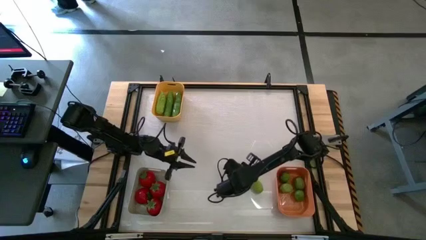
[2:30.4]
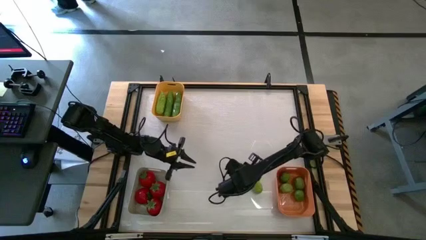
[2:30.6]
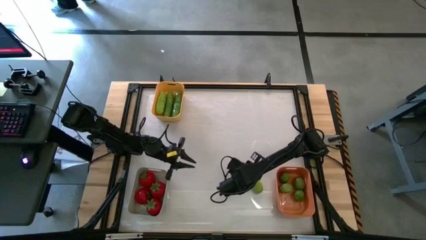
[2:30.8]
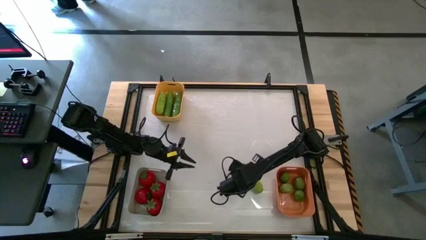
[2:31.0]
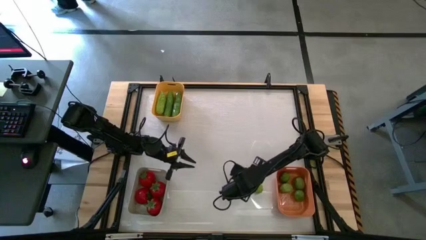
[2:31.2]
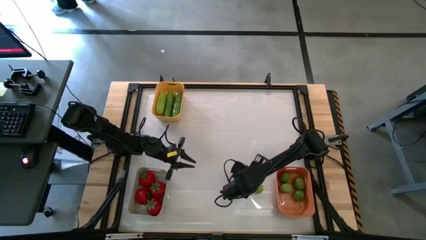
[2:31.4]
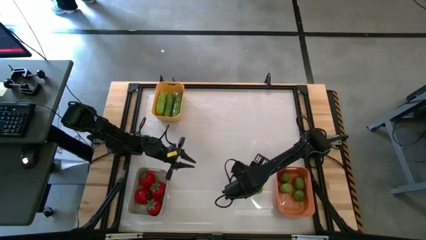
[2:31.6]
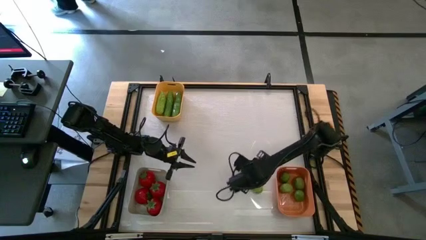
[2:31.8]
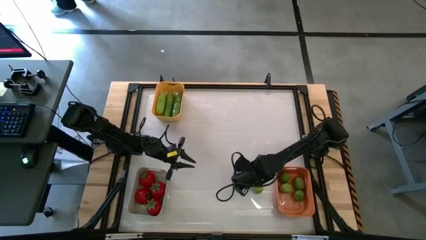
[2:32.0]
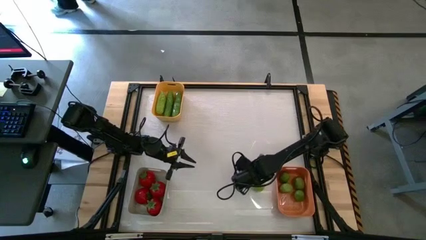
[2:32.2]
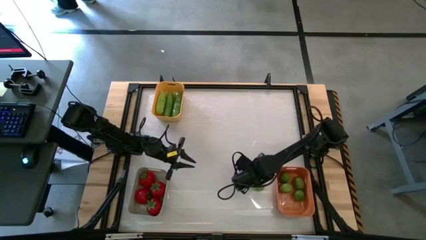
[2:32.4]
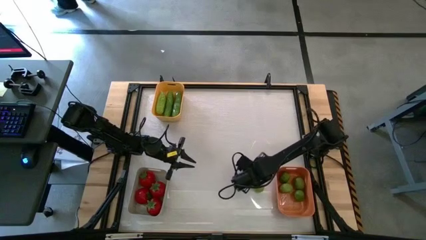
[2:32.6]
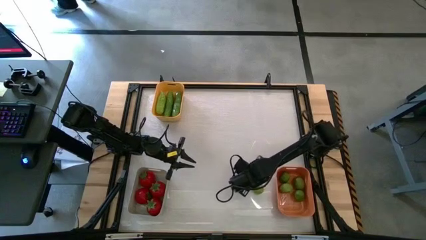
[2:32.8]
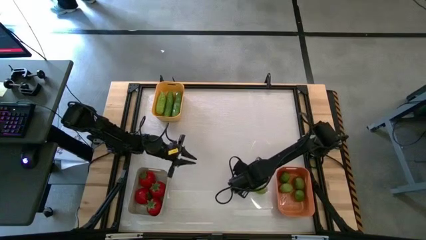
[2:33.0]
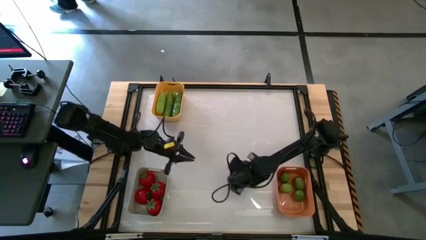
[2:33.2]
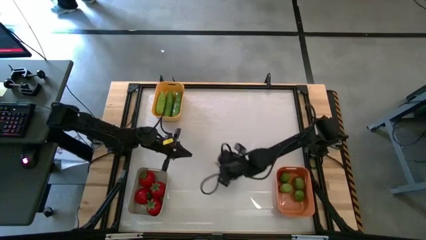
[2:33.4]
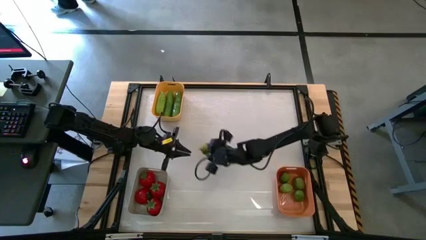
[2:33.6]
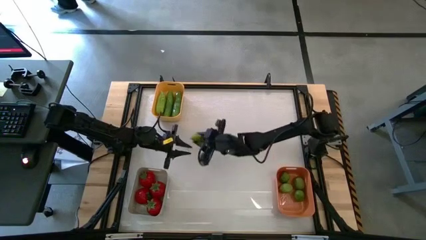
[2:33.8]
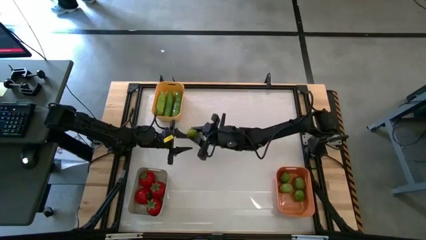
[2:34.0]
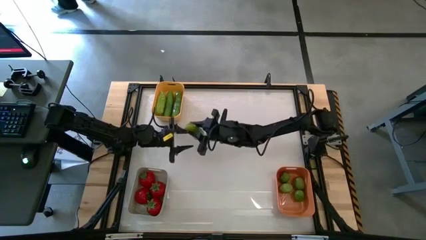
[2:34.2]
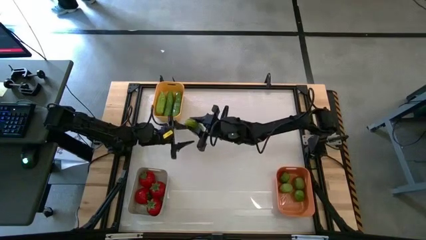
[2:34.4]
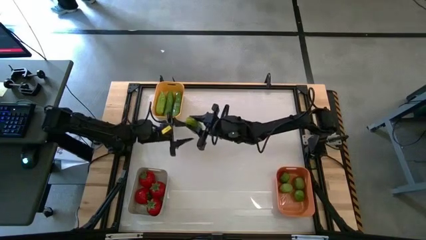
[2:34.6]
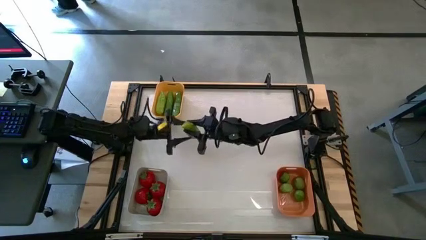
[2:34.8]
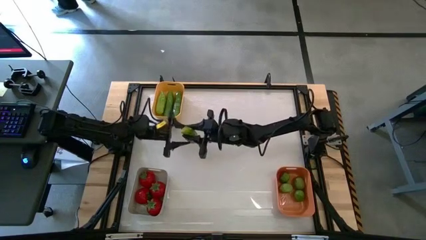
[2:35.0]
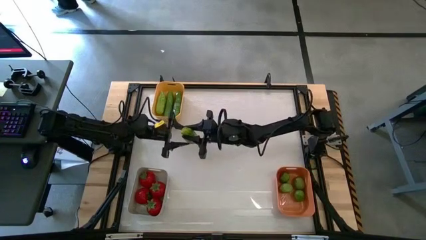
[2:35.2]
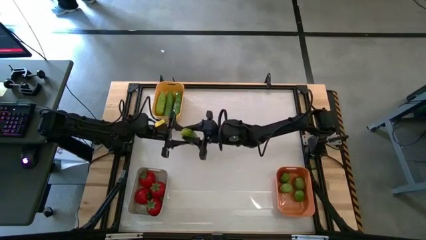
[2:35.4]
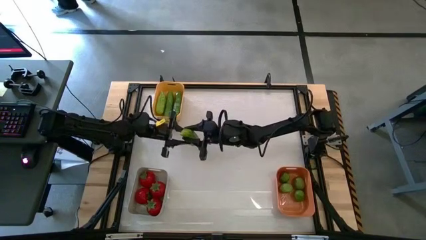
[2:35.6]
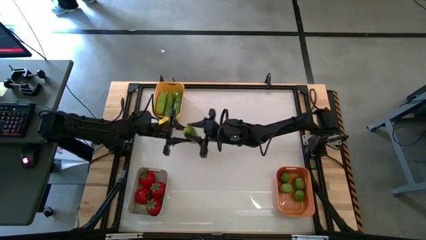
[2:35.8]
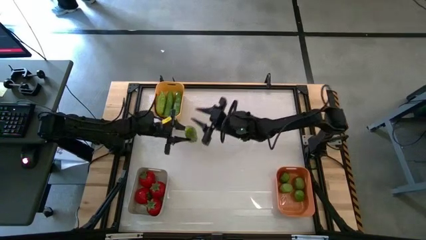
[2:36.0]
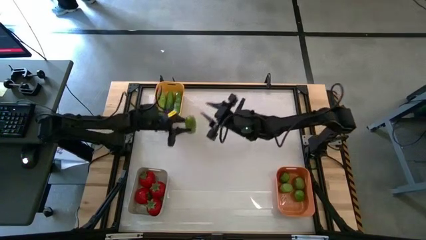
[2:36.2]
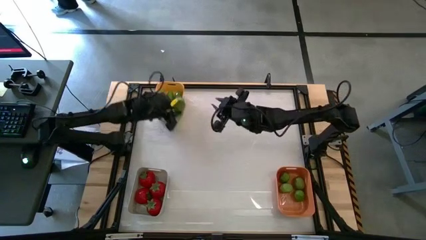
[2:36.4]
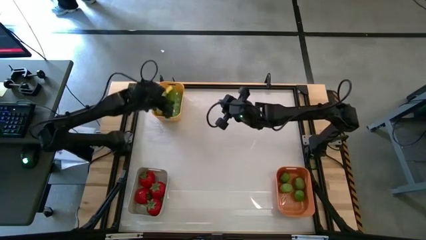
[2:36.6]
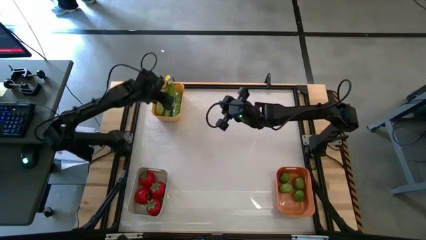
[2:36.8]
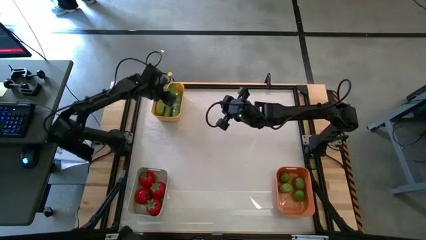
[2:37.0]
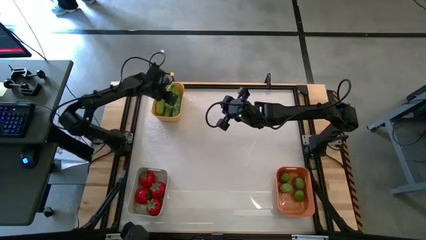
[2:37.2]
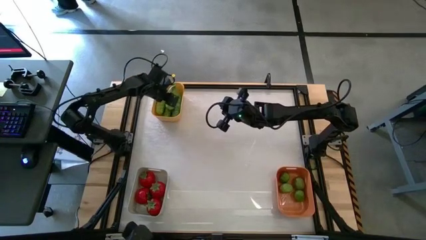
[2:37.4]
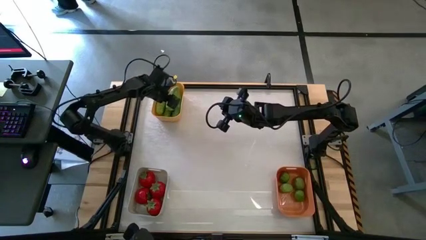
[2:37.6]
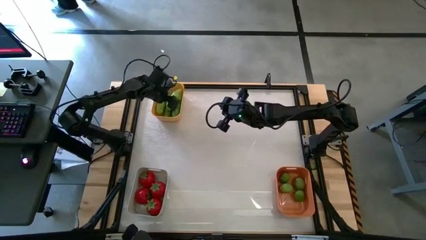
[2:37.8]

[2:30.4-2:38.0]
Task: Sort produce into baskets
Put the green cucumber into the yellow bin

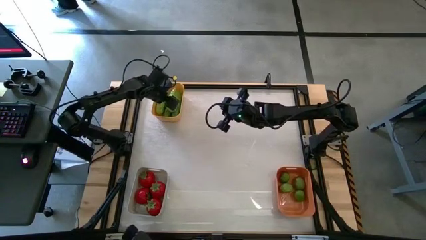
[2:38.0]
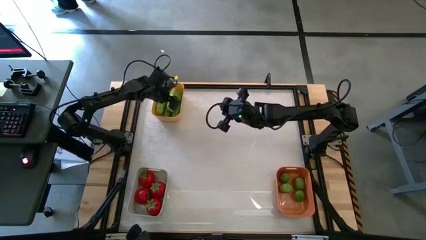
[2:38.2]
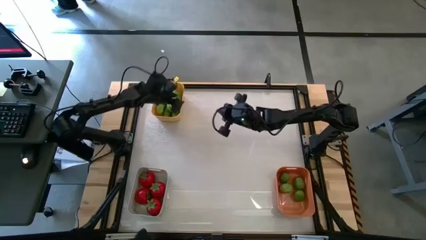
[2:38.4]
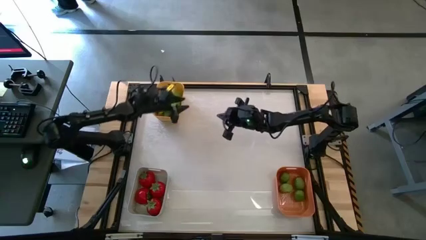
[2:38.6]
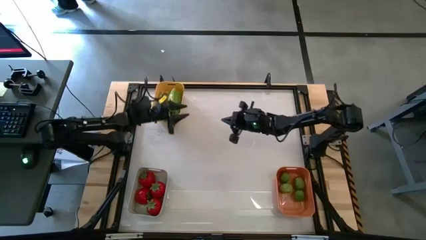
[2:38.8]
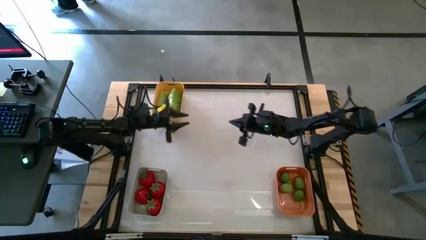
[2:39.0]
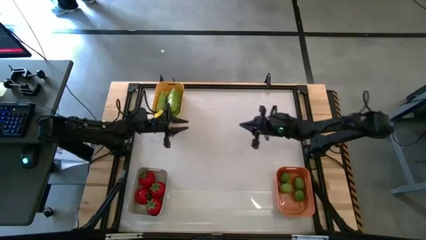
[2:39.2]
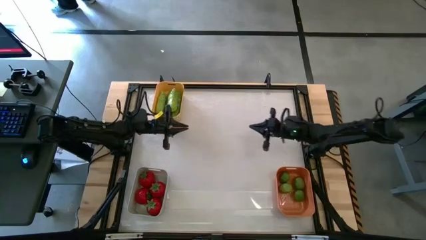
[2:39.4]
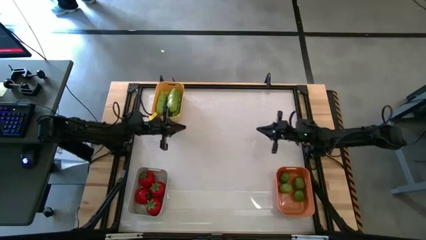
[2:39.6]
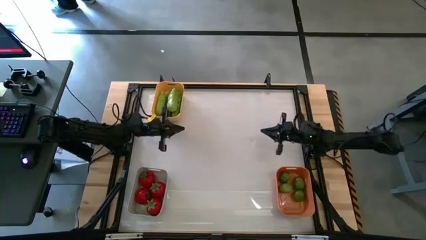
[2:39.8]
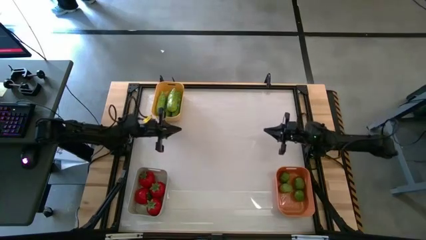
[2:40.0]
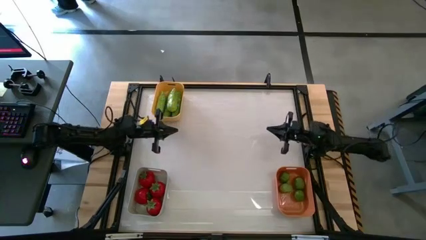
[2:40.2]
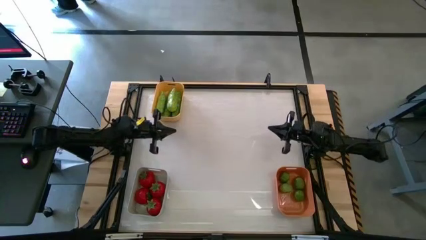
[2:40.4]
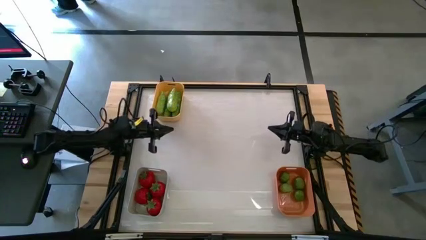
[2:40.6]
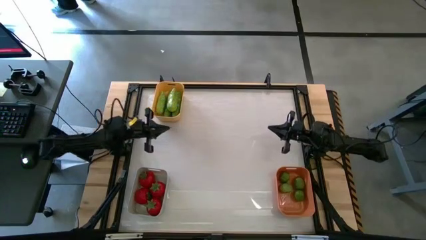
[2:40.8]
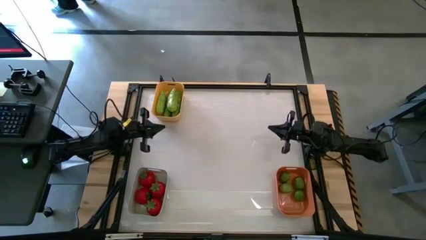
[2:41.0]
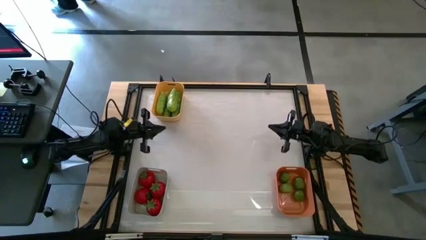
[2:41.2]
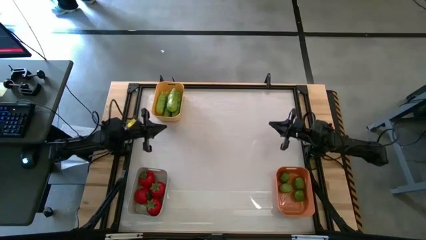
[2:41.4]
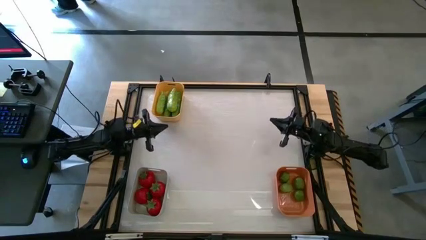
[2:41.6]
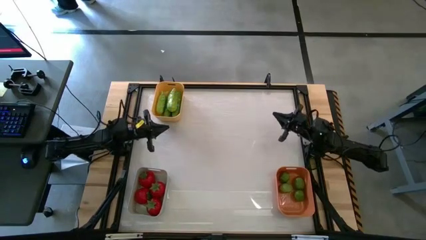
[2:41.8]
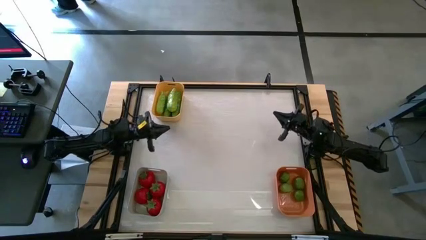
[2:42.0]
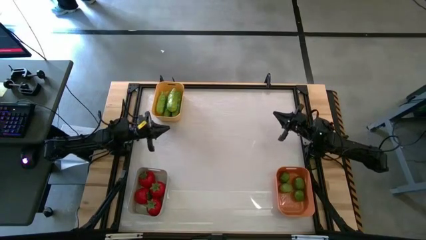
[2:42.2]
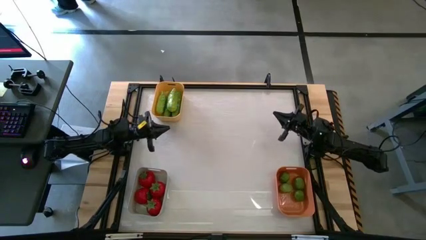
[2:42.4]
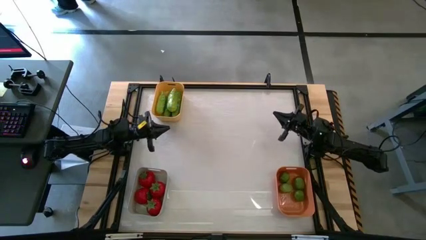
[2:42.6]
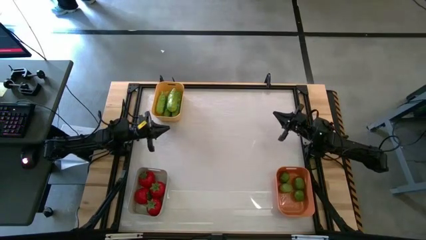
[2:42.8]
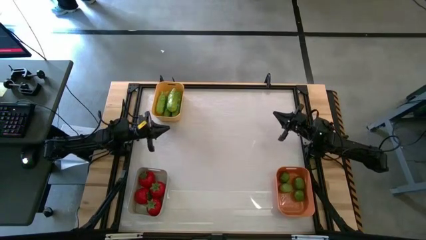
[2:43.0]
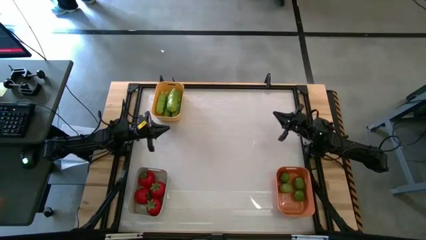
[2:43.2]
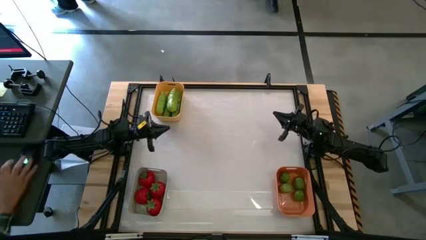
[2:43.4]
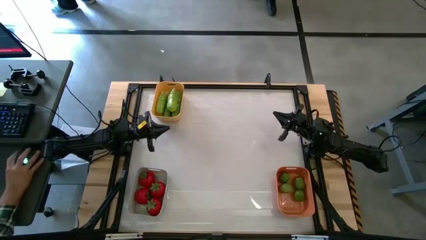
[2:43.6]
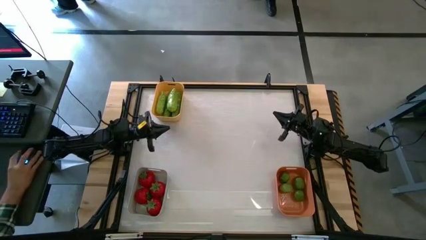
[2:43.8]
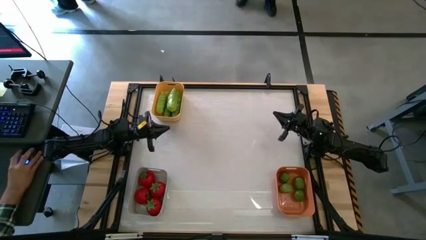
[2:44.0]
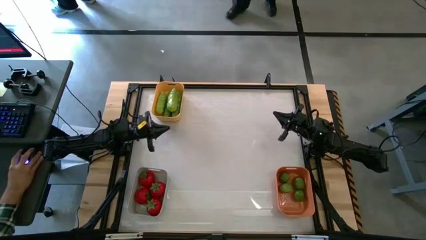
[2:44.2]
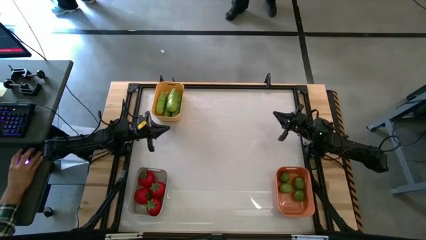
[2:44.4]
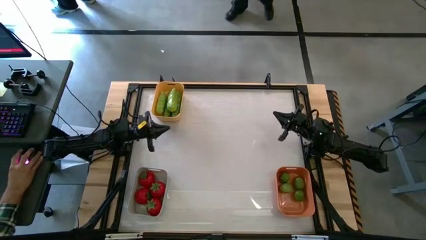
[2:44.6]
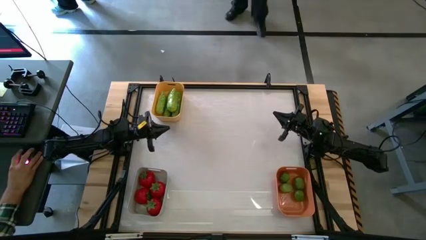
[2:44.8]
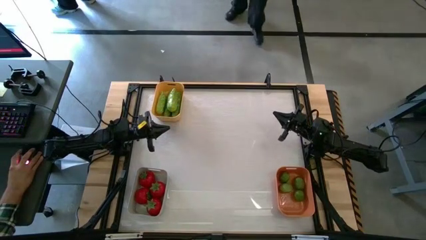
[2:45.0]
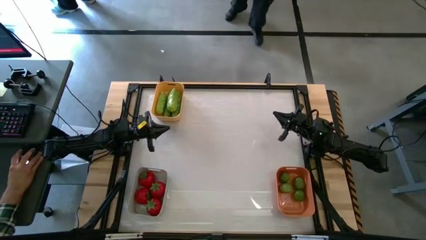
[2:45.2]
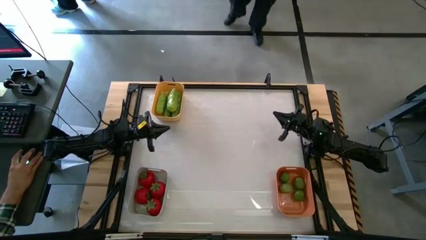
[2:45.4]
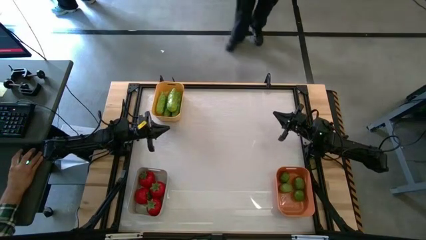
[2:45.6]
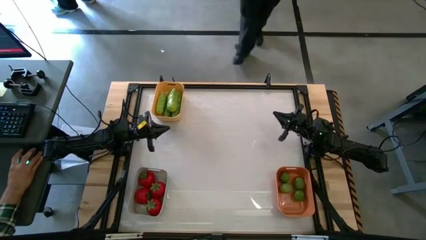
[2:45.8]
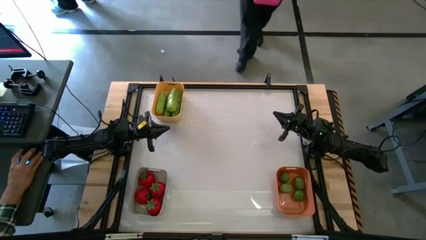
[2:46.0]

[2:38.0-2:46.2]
Return to Home Position
